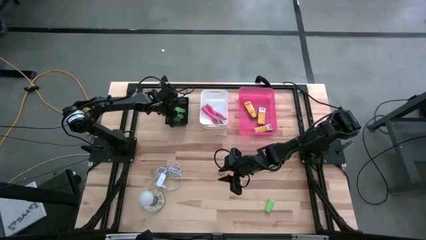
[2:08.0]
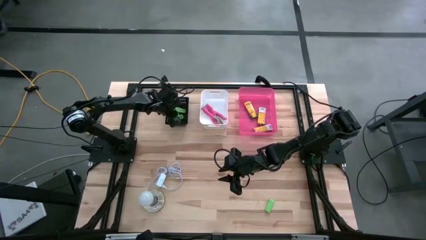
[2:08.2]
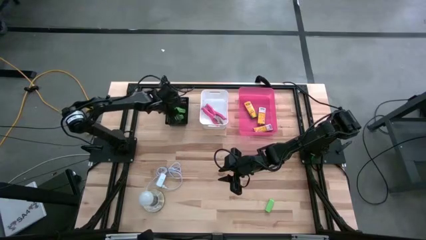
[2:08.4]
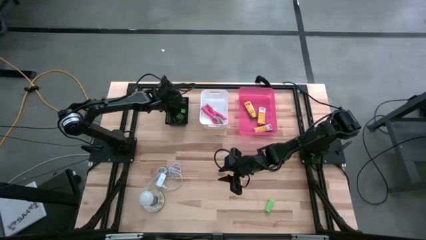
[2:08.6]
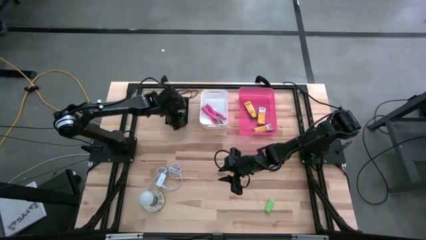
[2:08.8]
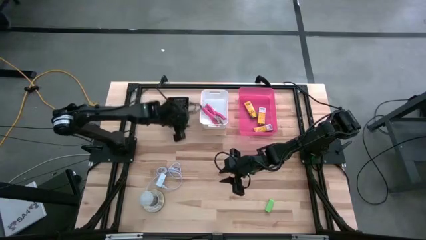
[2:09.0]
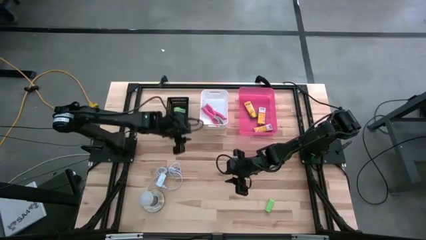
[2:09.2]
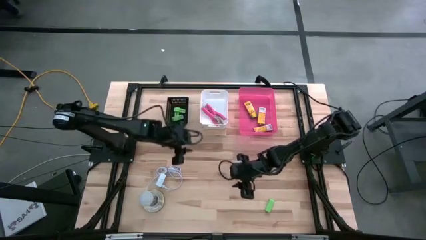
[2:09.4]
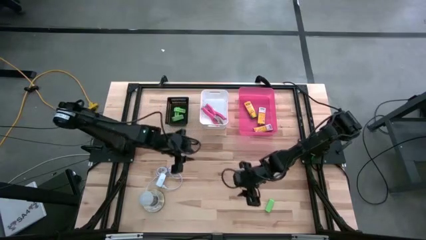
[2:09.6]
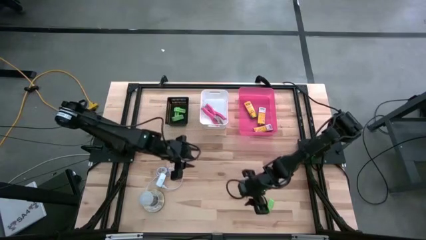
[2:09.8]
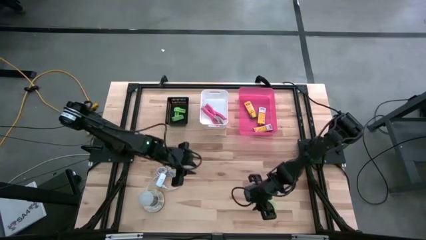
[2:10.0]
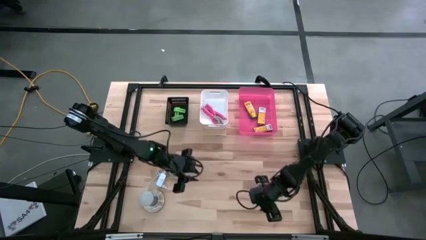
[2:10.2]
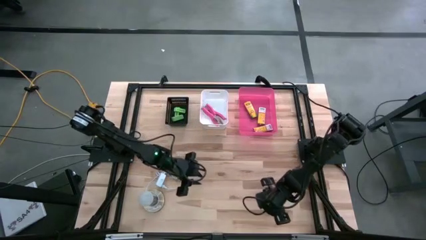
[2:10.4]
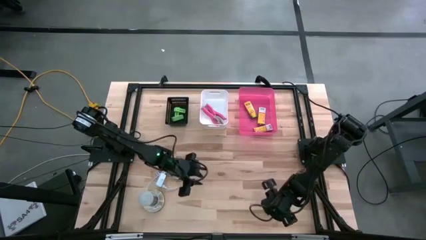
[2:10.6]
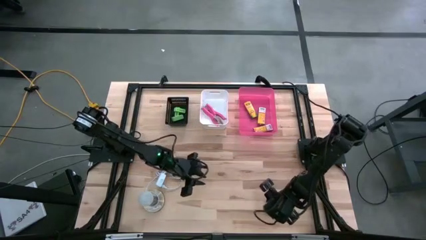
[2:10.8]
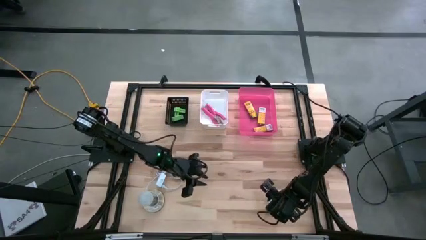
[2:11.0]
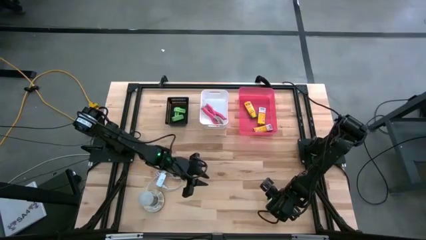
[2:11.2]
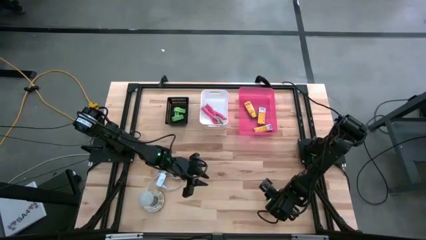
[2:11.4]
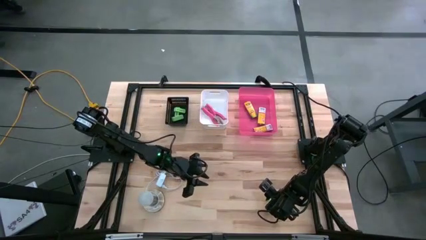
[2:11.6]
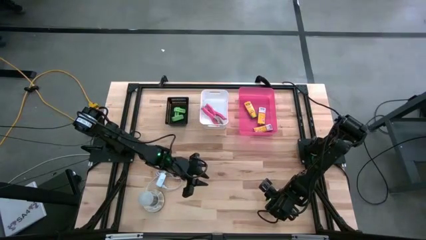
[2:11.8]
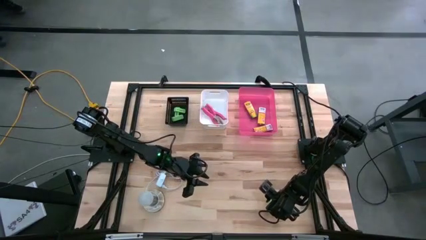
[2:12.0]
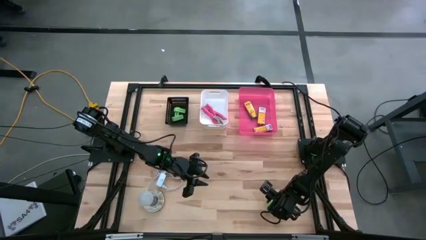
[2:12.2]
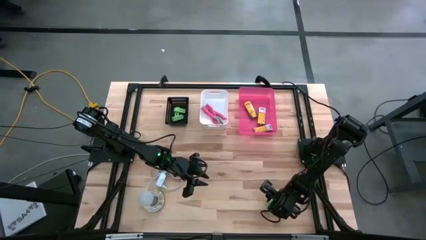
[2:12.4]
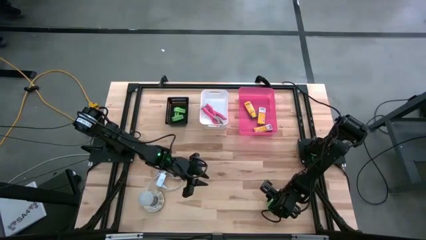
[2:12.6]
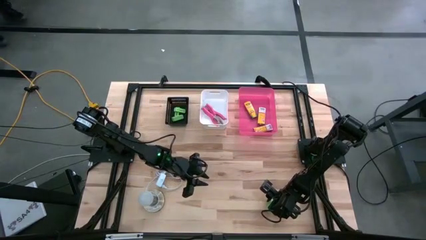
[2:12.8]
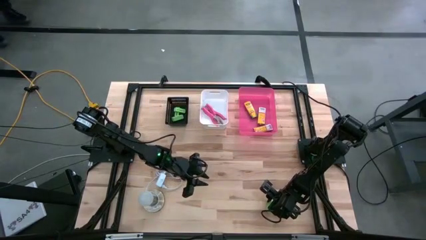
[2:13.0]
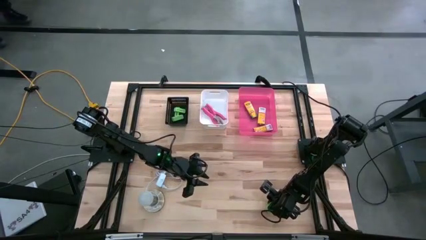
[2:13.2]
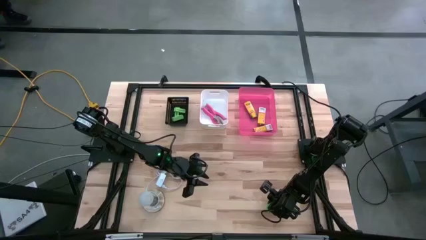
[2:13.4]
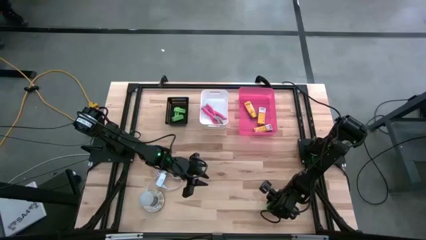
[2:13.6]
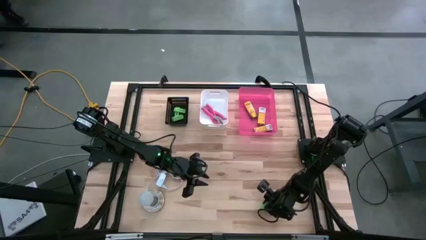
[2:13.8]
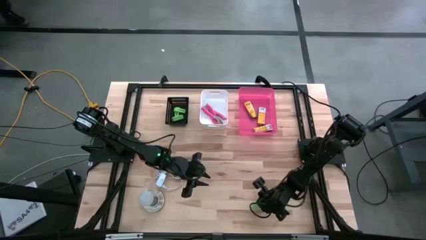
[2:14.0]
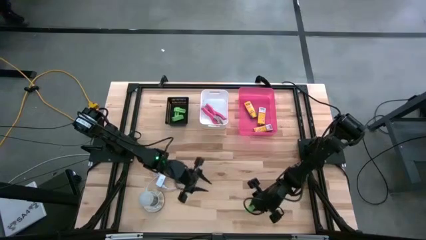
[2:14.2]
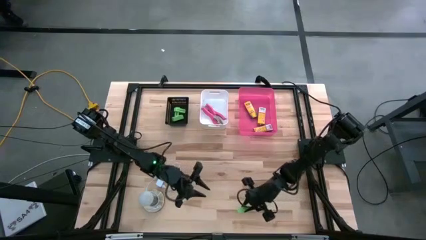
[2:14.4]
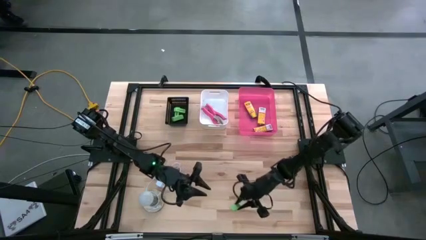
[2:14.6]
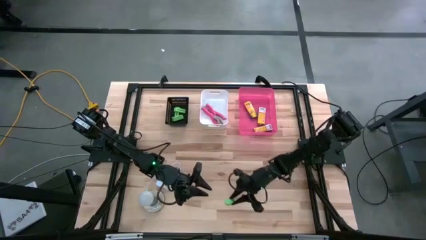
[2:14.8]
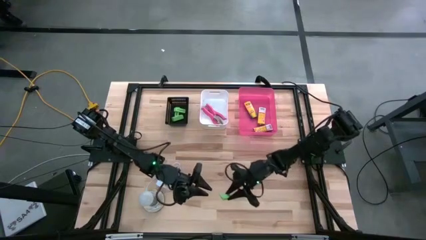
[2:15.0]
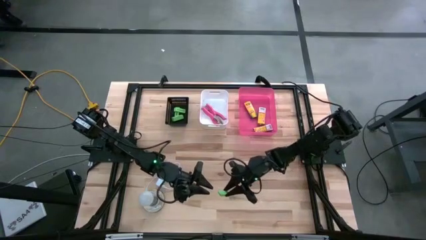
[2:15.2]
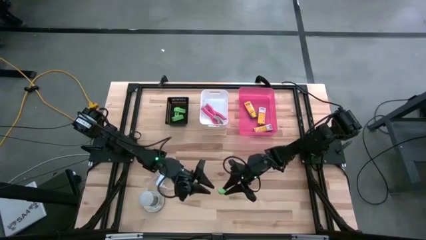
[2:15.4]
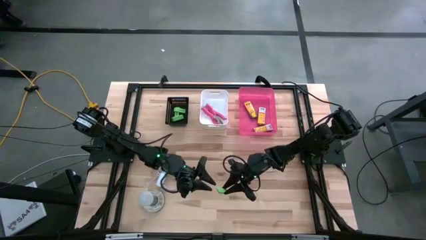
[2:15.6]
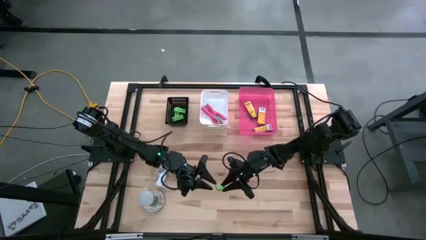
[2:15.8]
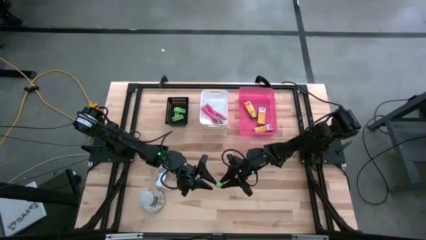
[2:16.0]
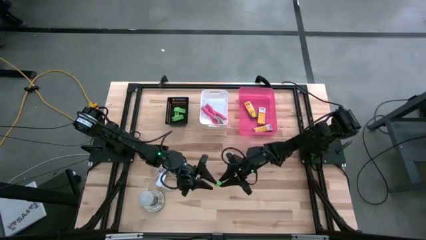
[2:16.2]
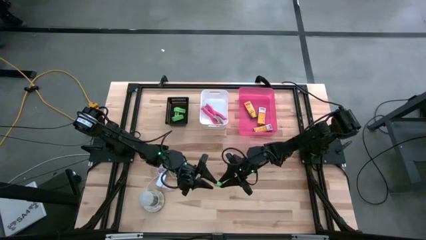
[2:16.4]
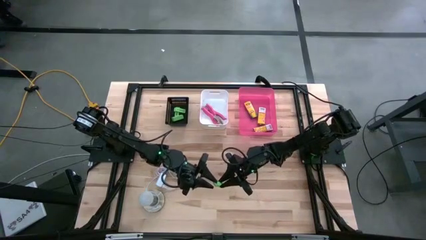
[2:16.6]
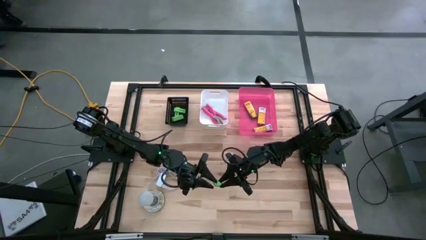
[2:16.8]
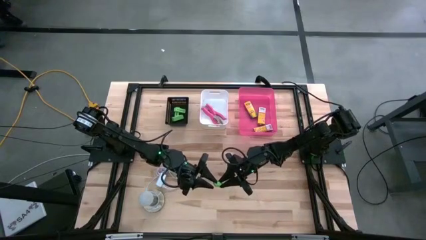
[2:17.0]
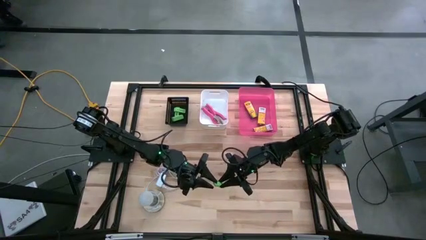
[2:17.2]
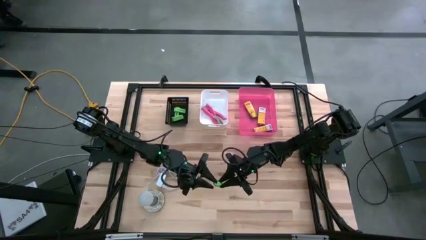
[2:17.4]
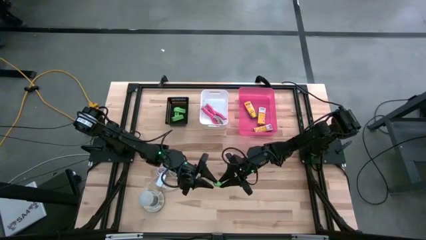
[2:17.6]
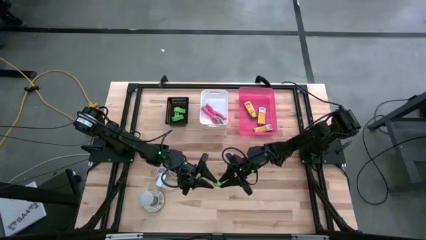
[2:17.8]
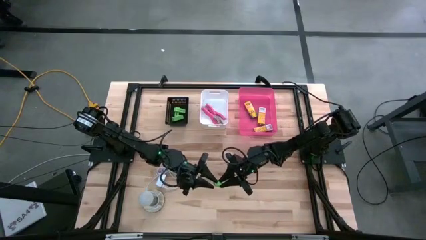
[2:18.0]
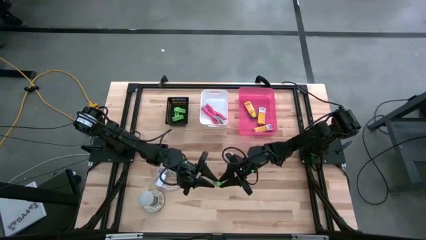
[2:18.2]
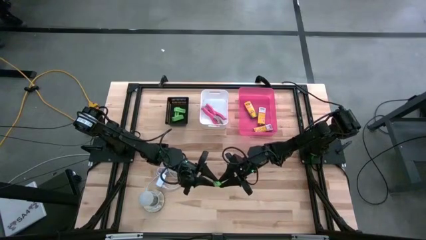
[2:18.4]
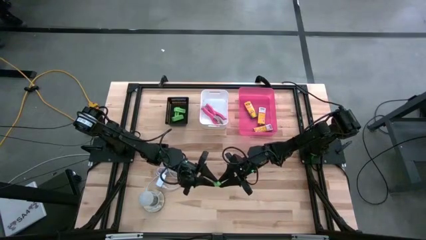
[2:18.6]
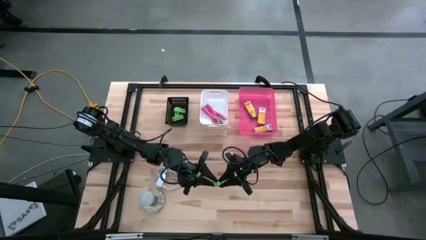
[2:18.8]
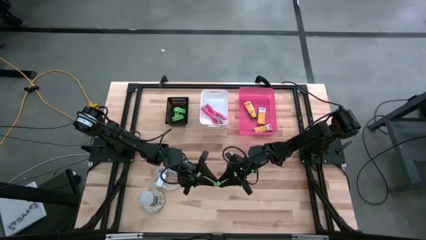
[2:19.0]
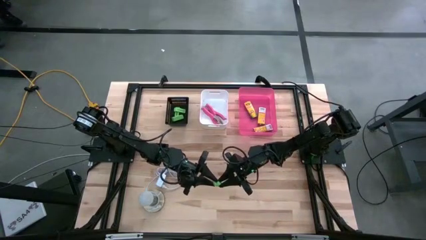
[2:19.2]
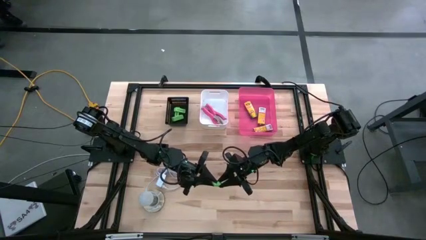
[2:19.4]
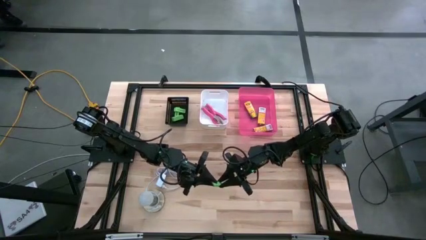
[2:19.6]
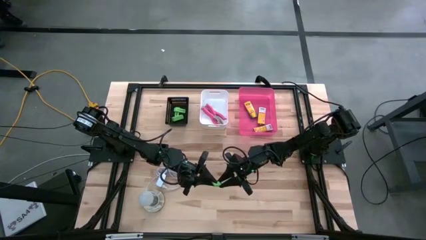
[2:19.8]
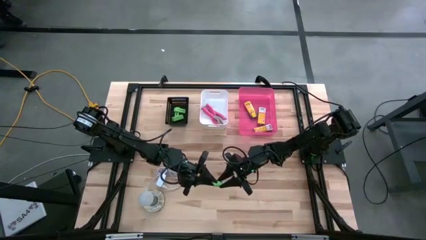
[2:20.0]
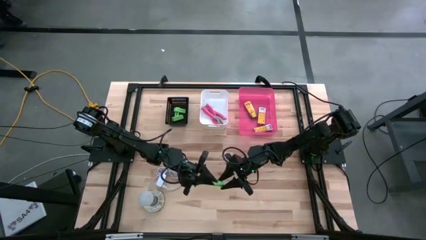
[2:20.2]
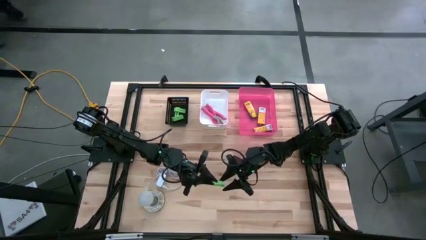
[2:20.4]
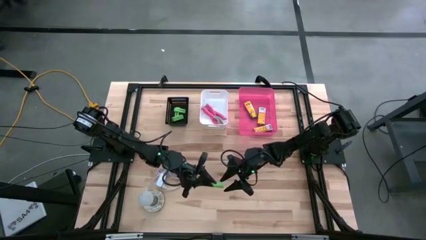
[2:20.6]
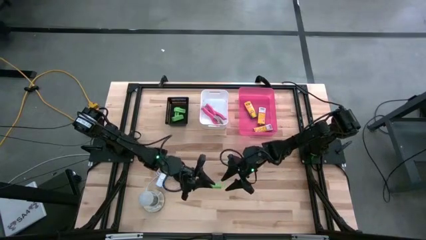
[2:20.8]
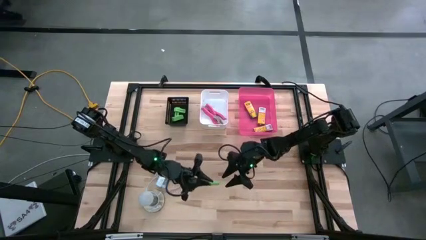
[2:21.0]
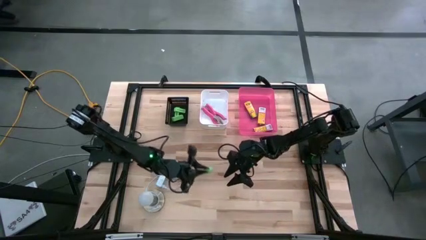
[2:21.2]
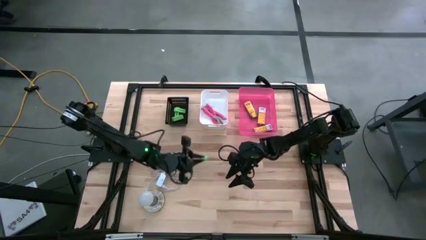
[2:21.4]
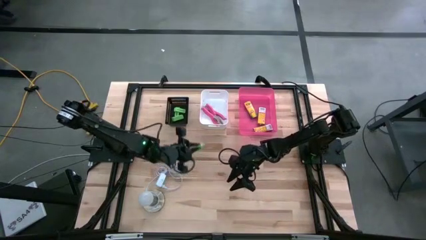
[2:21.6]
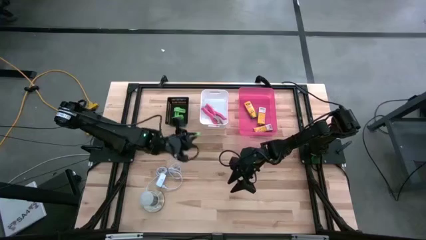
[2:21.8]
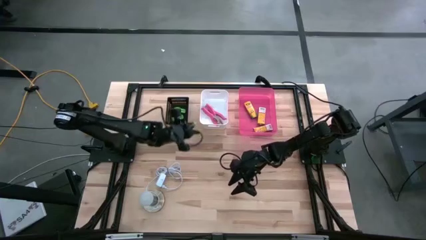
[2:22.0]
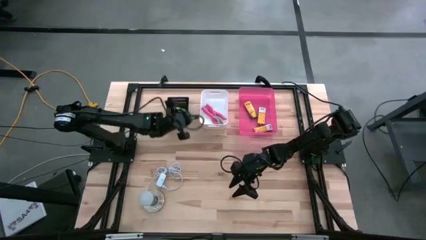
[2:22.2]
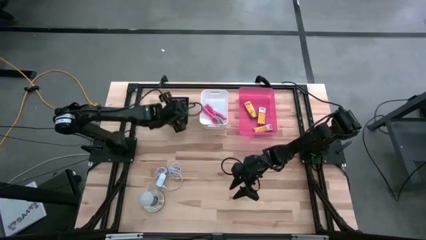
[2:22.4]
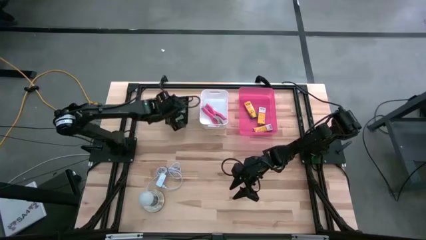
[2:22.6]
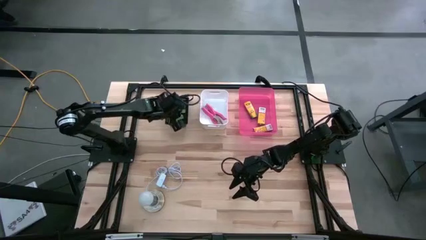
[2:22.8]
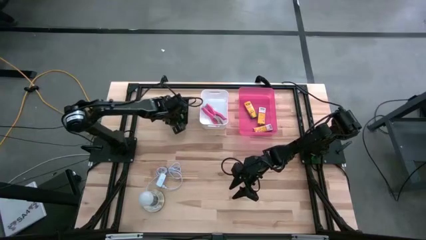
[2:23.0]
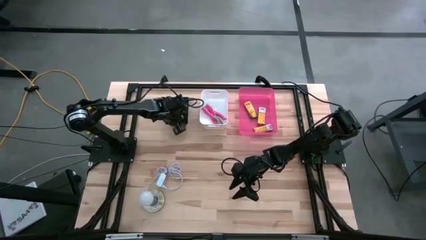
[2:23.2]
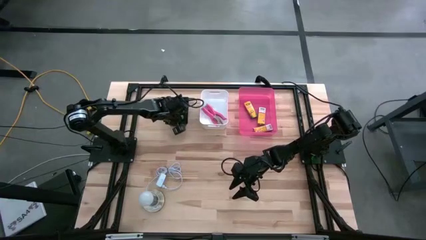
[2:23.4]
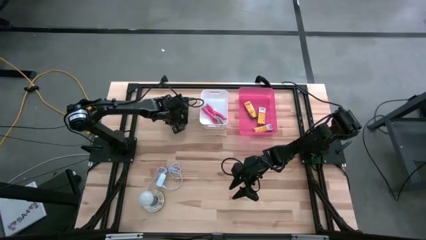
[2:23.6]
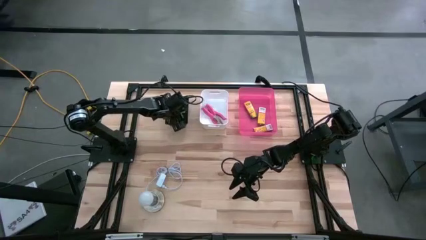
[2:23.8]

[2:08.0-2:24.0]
Task: Pick & Place School Supplies
Put the eraser into the black bin
